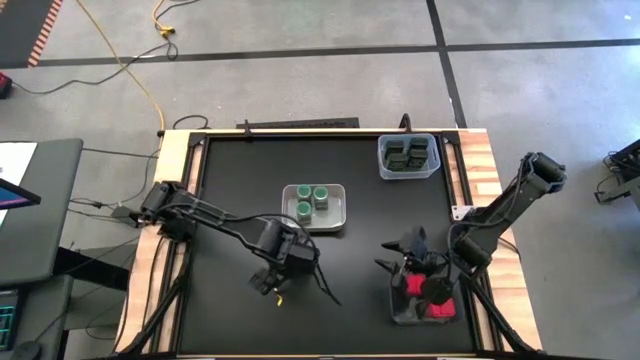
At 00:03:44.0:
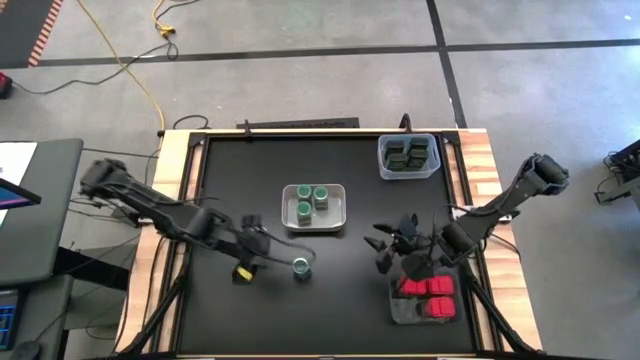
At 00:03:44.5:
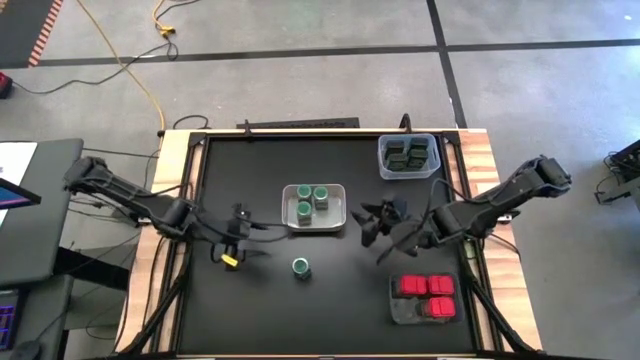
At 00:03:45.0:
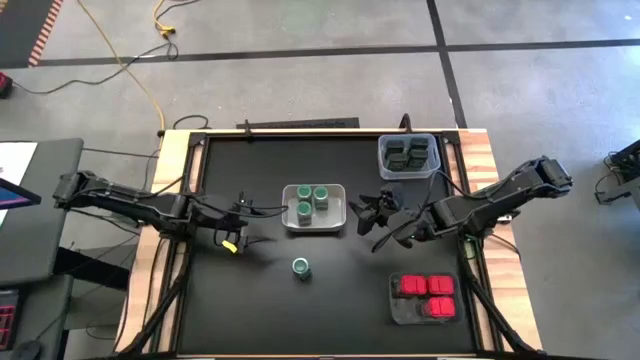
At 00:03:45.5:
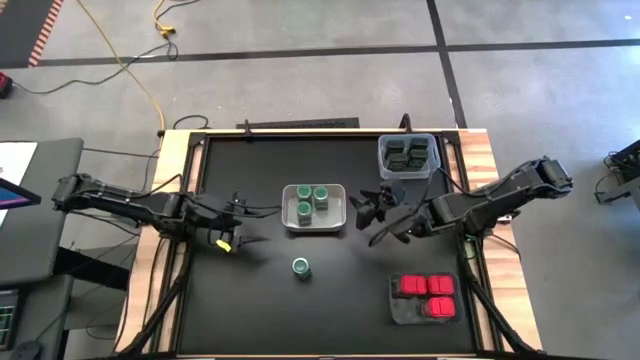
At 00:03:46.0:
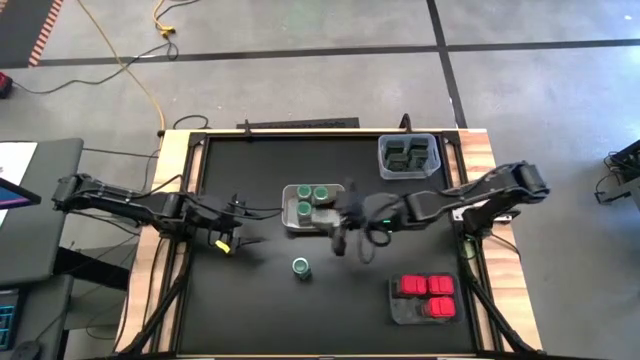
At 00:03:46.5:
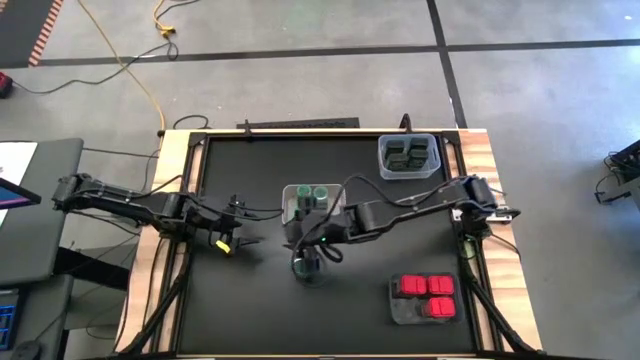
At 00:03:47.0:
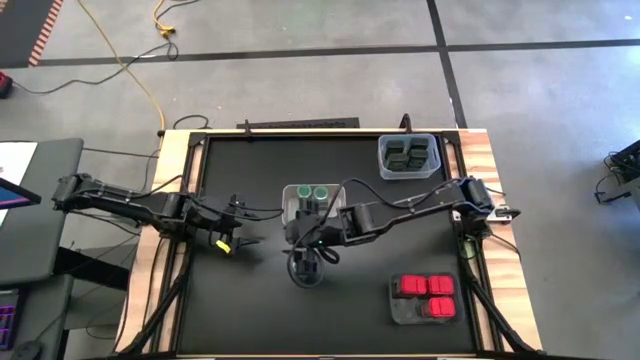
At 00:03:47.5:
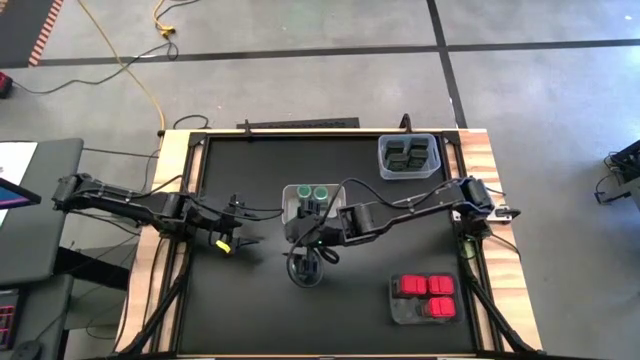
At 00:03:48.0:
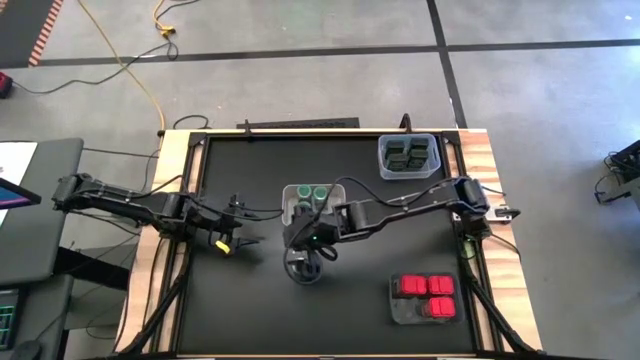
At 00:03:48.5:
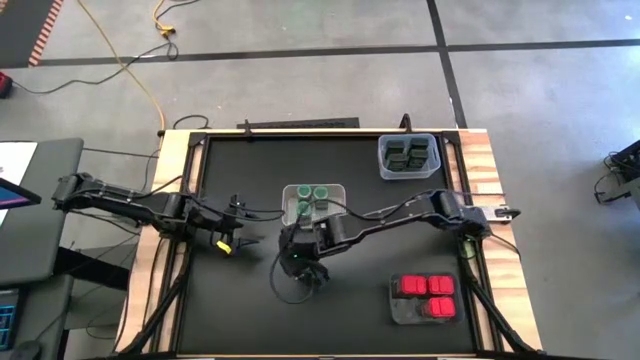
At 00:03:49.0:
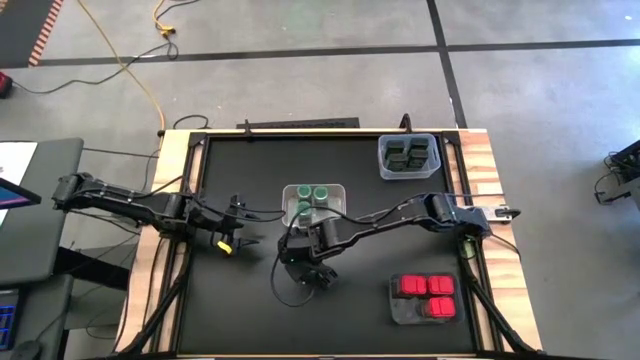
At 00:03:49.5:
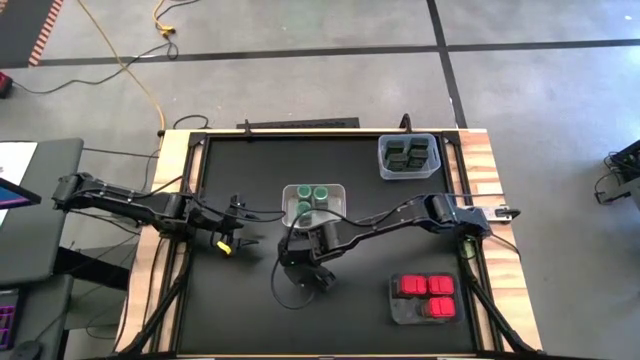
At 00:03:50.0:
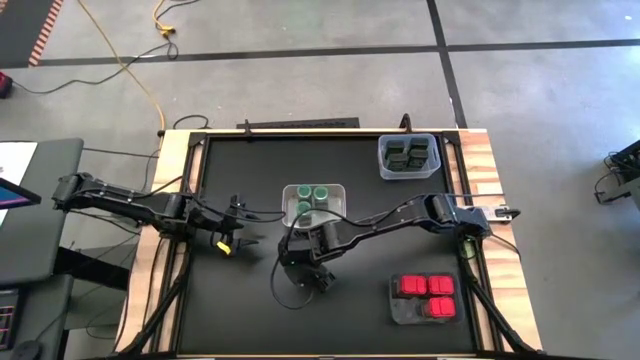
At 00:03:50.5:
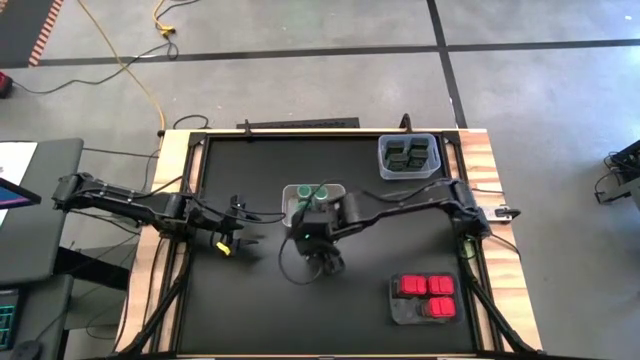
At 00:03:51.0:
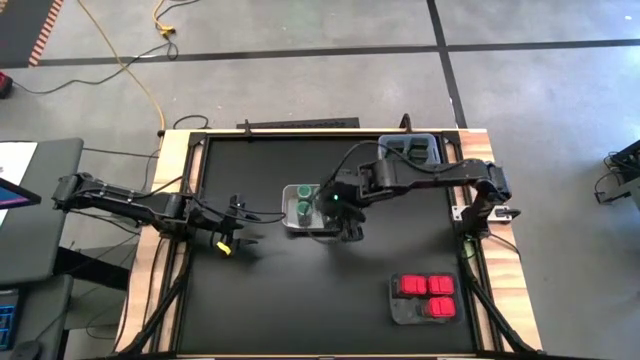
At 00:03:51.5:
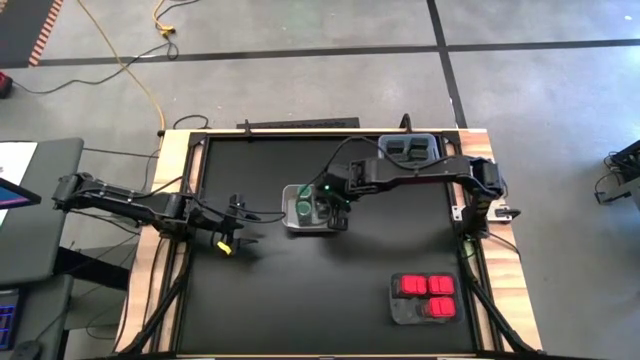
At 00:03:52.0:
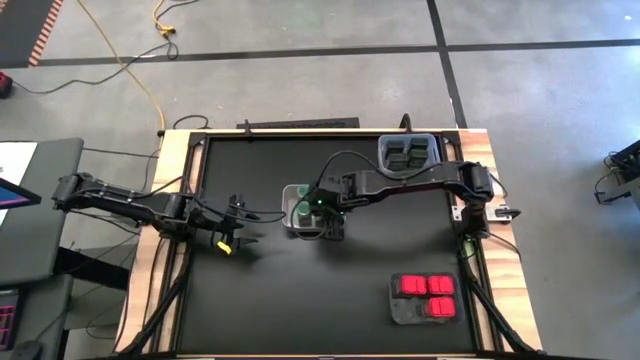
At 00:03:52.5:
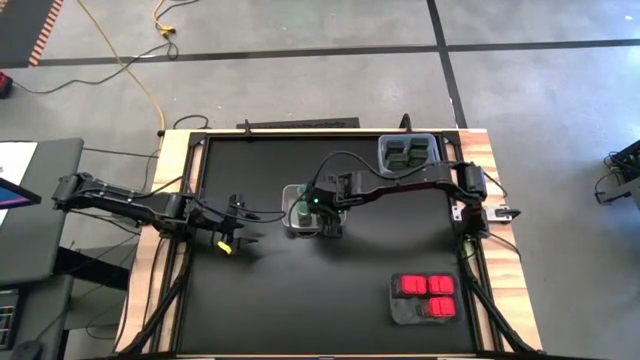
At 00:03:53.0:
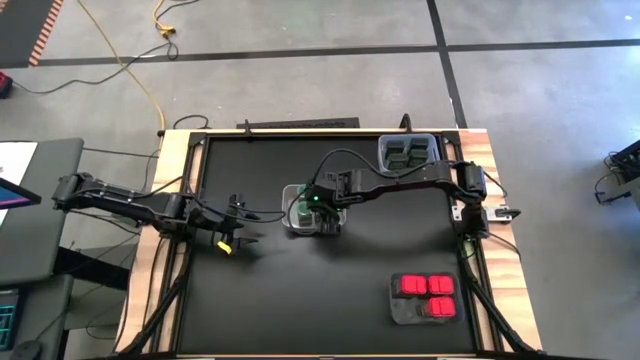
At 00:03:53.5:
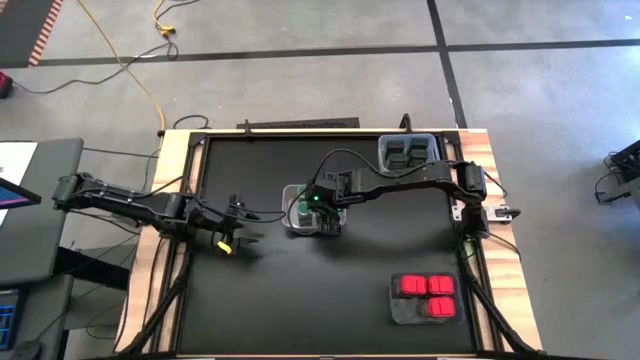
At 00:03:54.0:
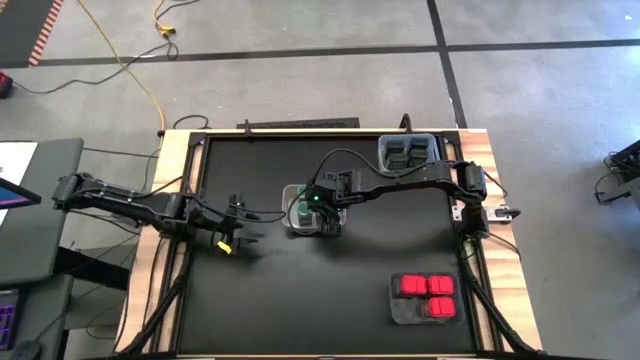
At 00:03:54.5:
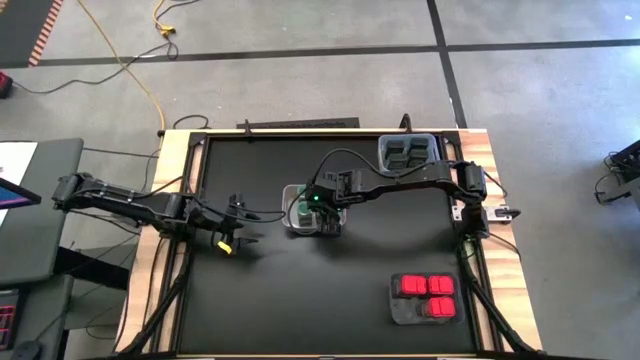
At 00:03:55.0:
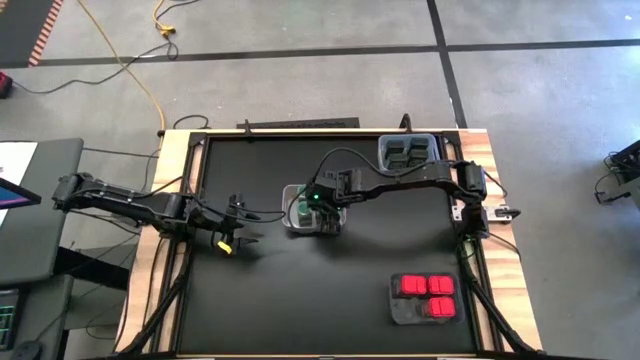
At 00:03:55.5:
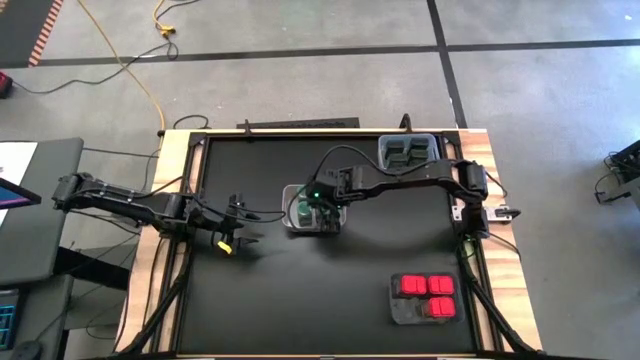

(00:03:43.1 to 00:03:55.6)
Task: Sort spices by type
Put the green seasoning bottle into the white bin

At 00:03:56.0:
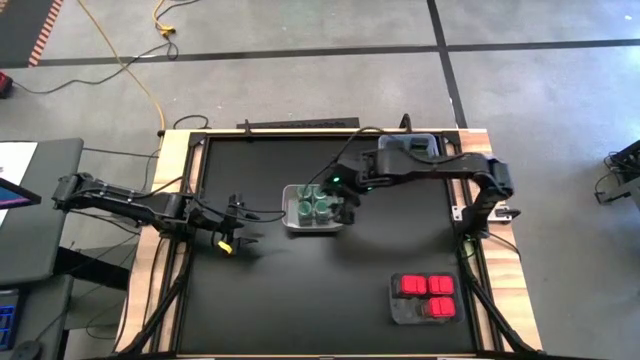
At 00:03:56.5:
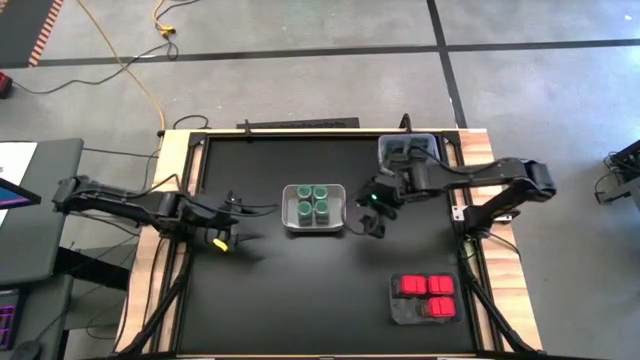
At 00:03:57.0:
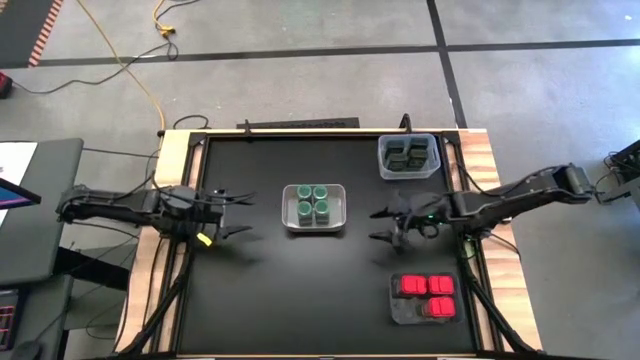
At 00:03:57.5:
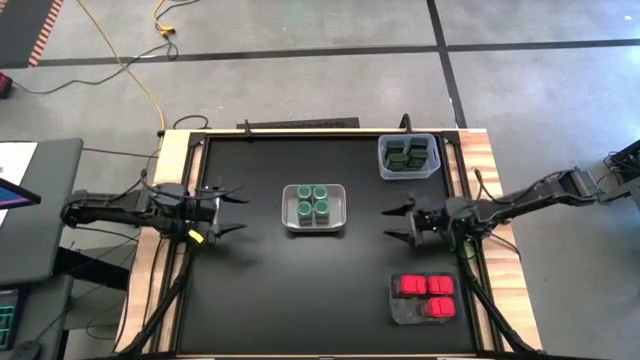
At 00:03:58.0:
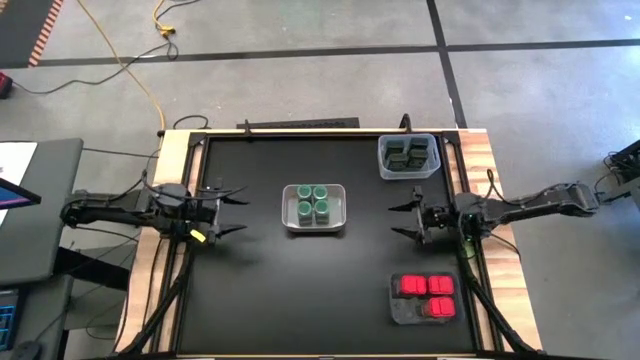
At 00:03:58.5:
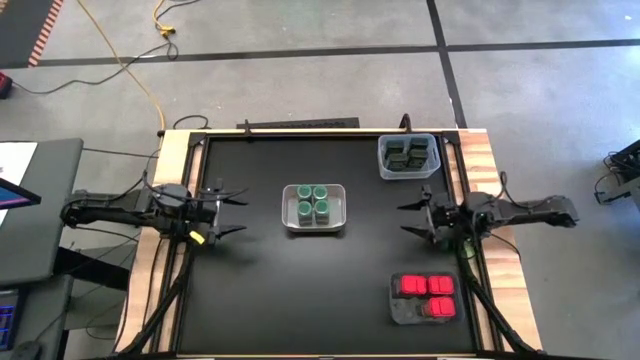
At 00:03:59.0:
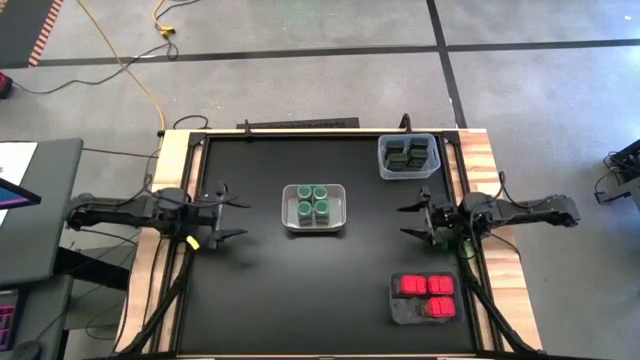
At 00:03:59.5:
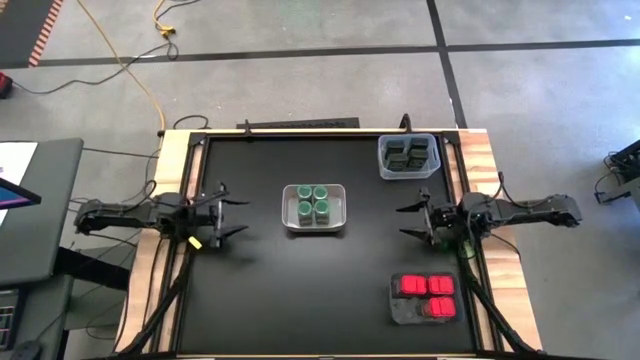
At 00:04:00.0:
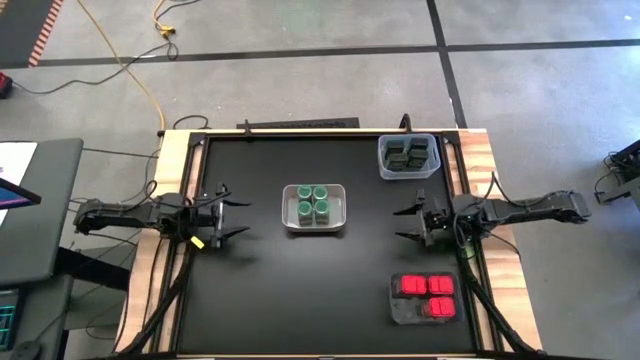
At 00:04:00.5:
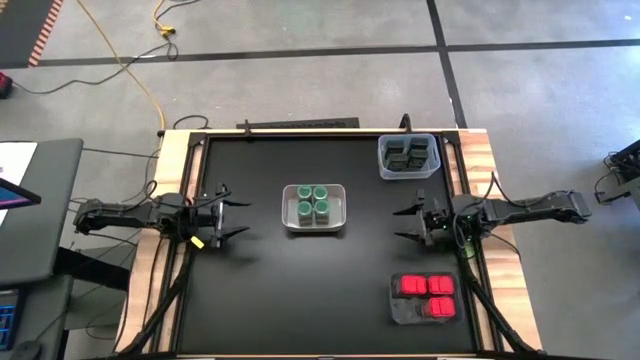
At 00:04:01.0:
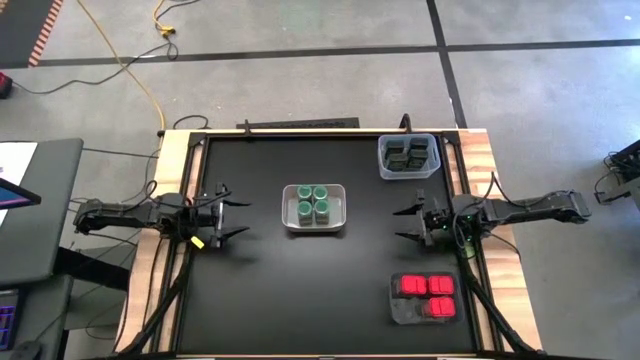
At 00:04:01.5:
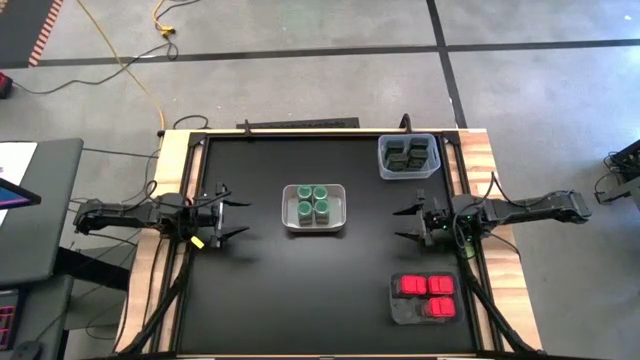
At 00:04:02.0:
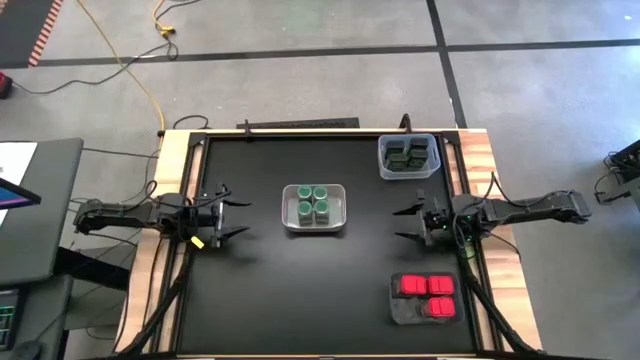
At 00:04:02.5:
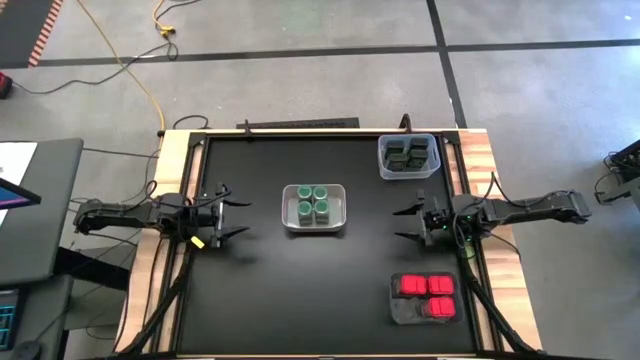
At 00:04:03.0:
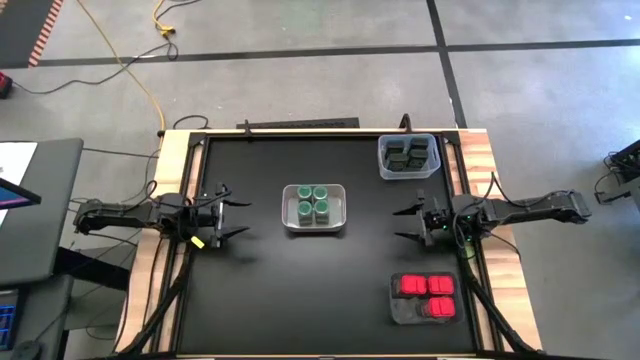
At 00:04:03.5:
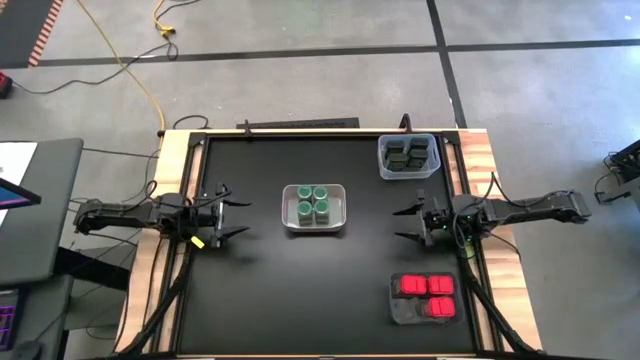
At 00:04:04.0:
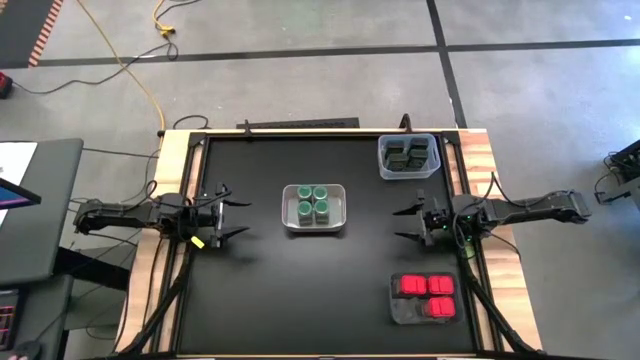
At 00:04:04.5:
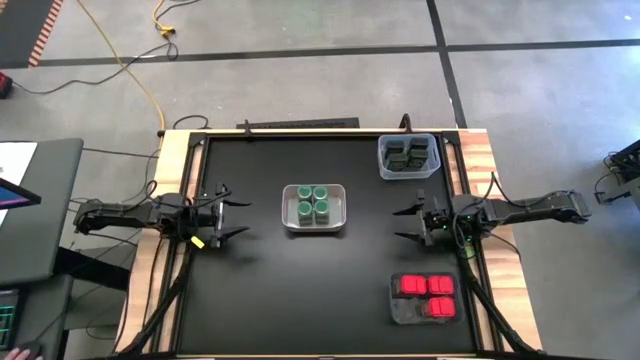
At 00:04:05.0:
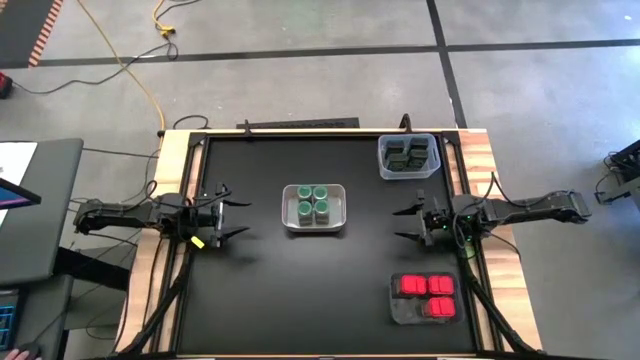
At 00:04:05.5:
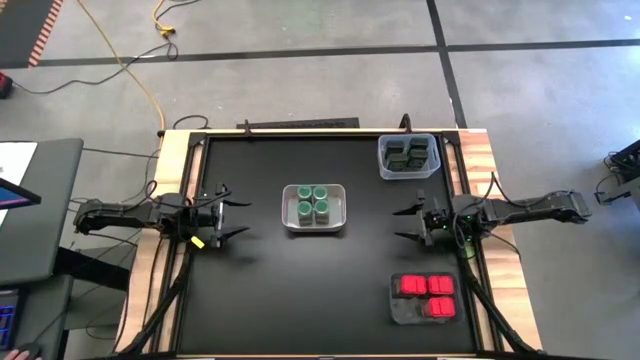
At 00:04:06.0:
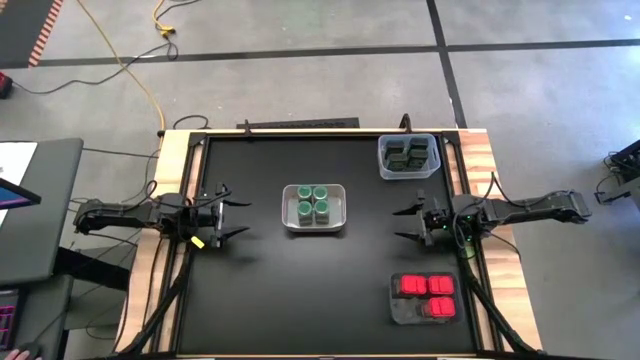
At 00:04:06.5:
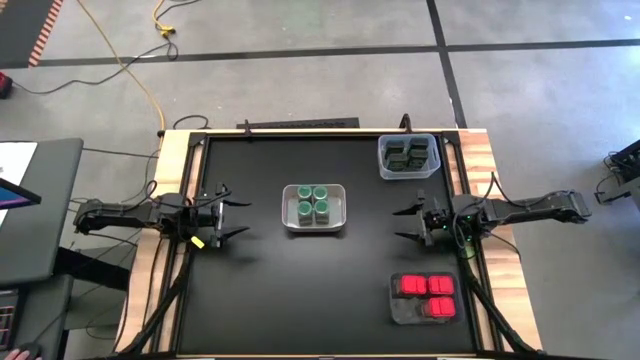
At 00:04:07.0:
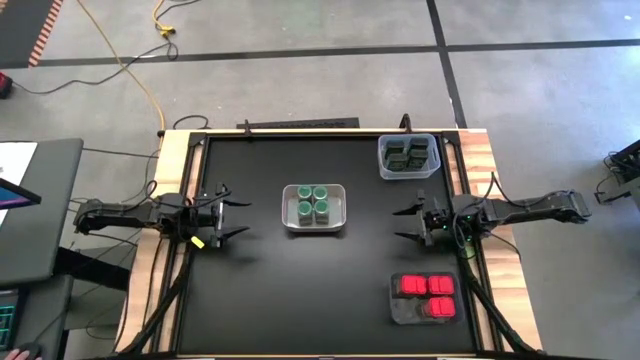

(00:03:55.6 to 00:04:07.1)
Return to Home Position
